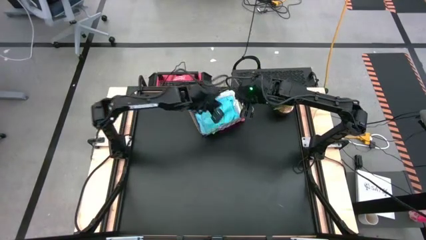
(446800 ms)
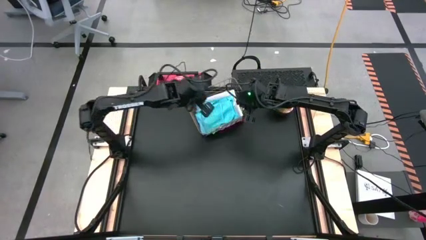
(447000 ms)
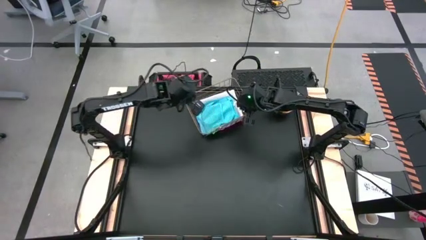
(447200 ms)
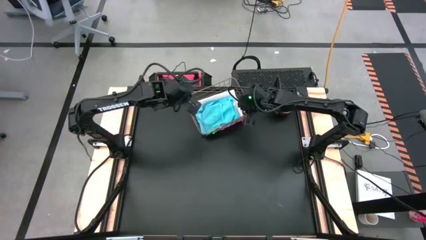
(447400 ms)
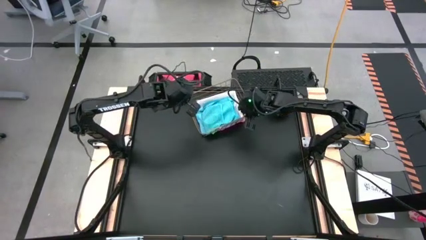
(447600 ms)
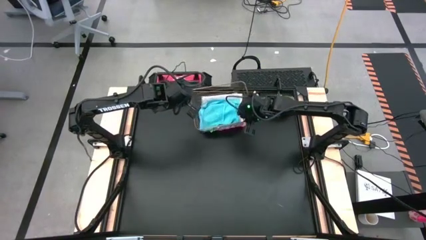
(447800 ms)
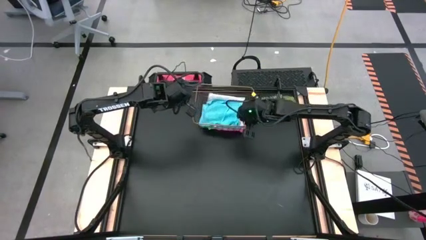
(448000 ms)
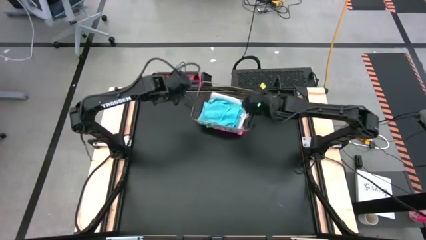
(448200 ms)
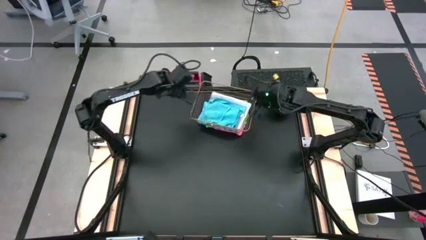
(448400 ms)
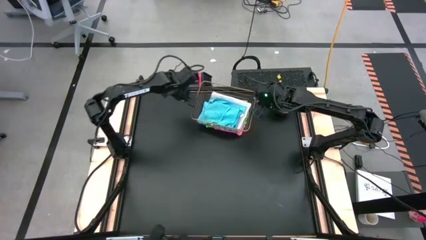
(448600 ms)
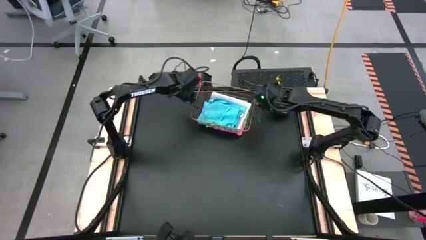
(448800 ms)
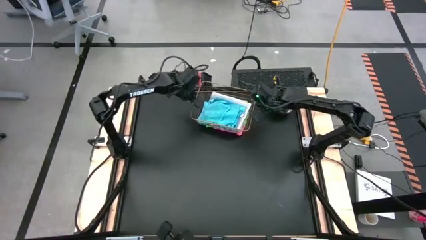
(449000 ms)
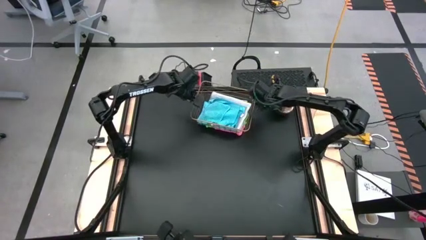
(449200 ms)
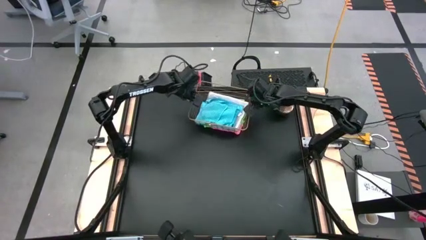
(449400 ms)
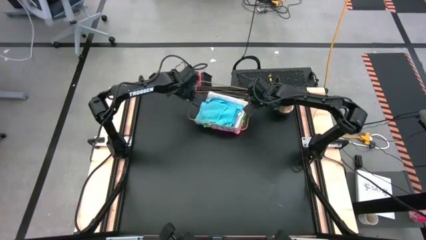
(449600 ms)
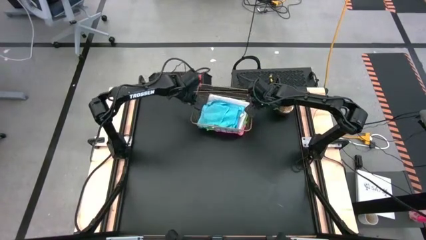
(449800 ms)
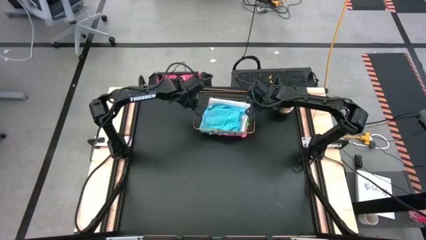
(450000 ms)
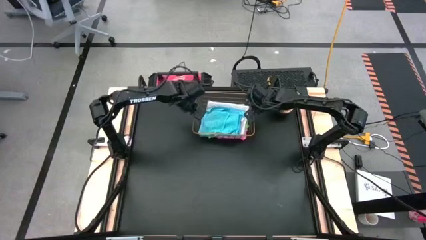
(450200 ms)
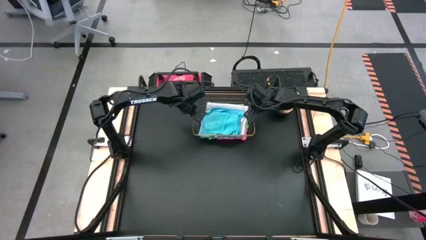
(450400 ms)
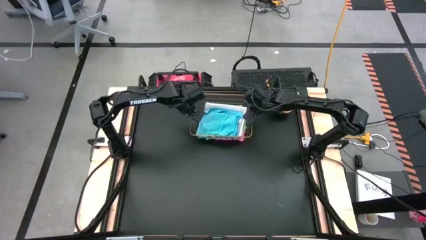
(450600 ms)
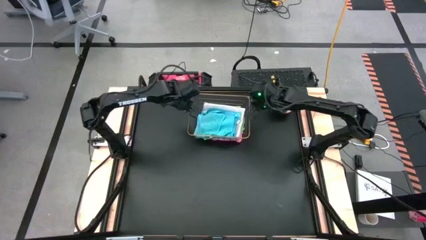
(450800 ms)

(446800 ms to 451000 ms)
Task: Fold microfiber towels
Adjust the wire basket

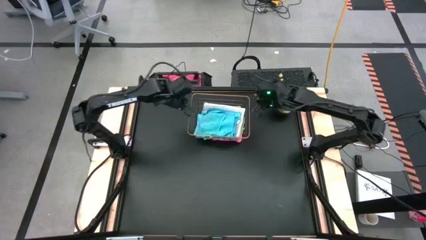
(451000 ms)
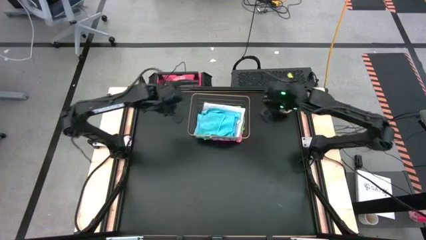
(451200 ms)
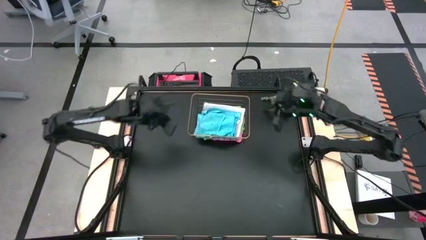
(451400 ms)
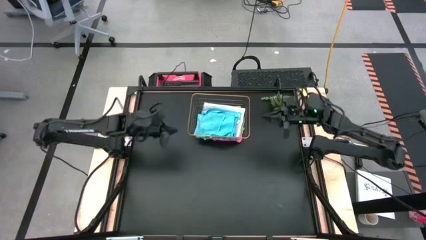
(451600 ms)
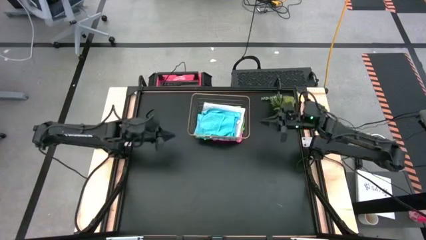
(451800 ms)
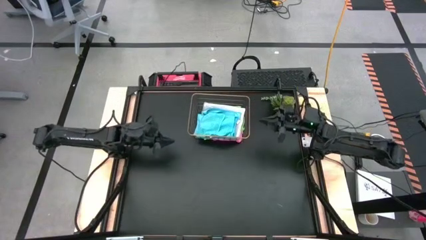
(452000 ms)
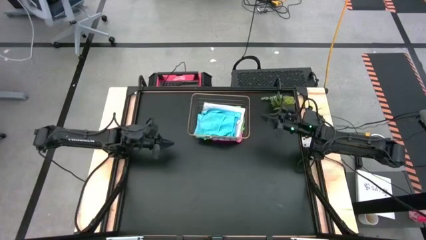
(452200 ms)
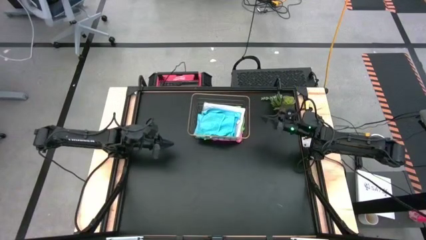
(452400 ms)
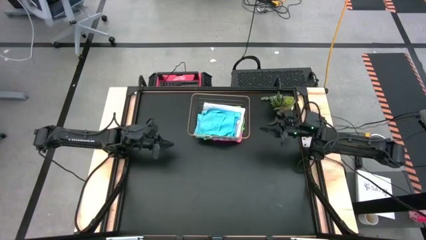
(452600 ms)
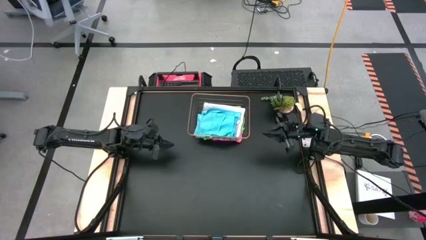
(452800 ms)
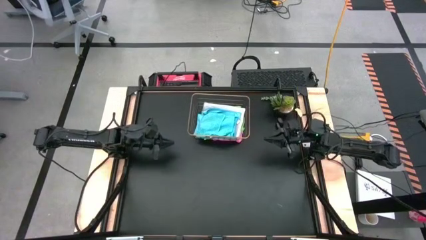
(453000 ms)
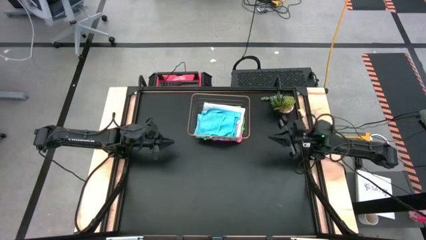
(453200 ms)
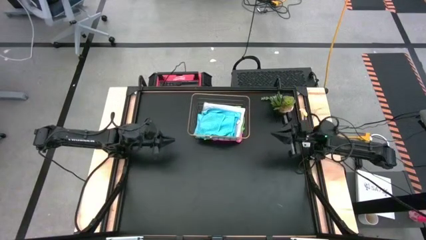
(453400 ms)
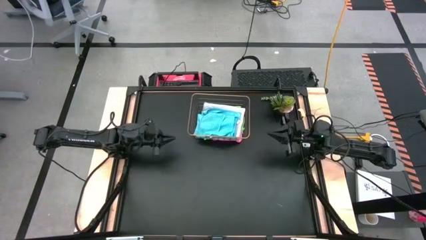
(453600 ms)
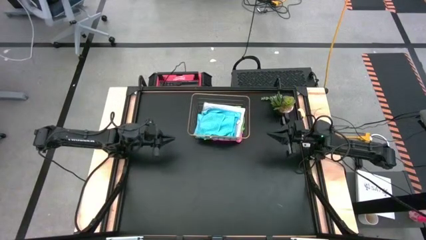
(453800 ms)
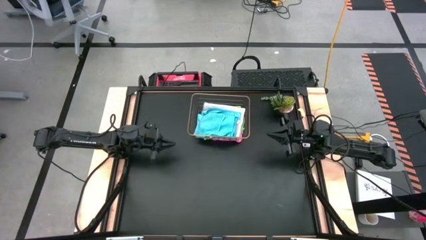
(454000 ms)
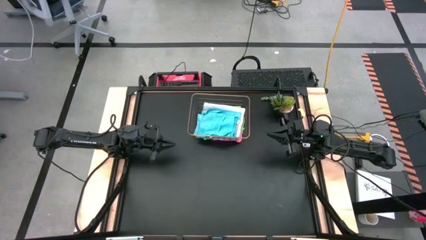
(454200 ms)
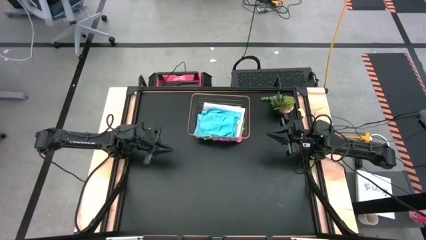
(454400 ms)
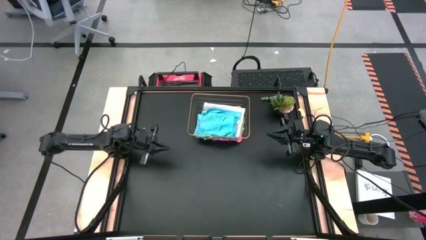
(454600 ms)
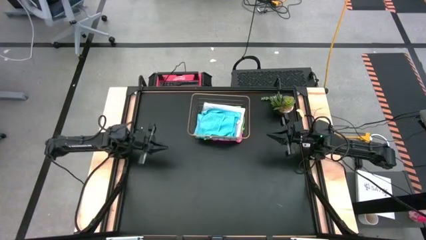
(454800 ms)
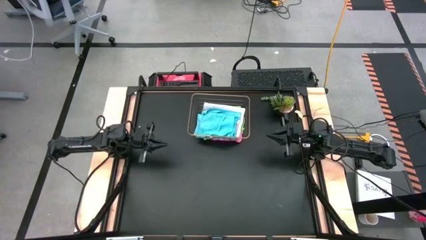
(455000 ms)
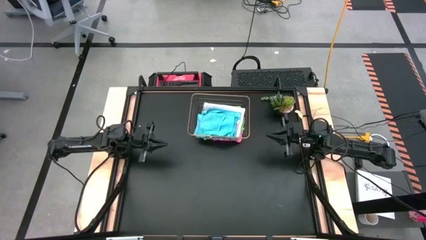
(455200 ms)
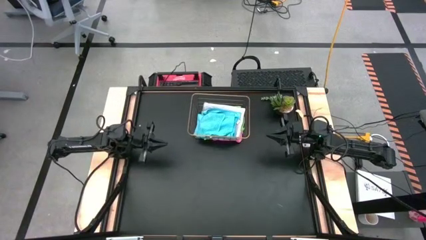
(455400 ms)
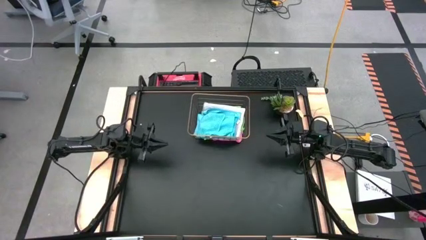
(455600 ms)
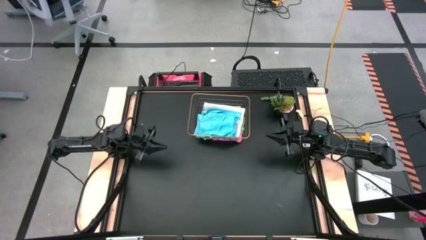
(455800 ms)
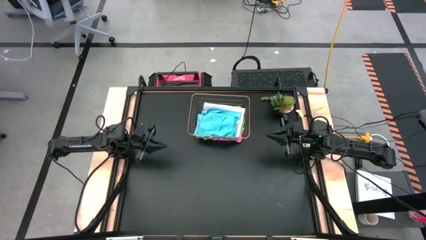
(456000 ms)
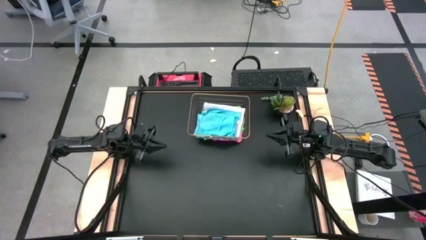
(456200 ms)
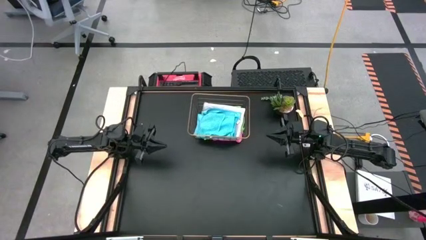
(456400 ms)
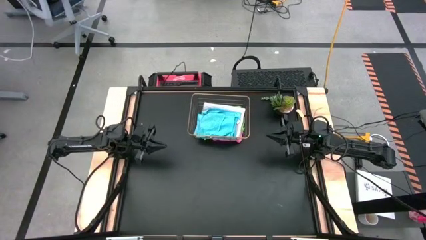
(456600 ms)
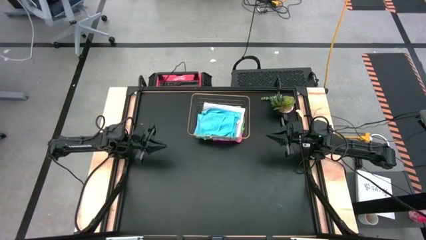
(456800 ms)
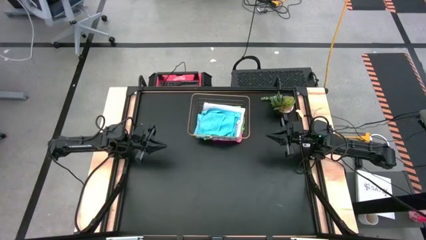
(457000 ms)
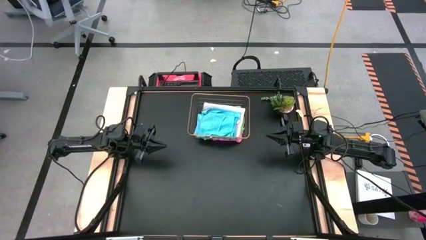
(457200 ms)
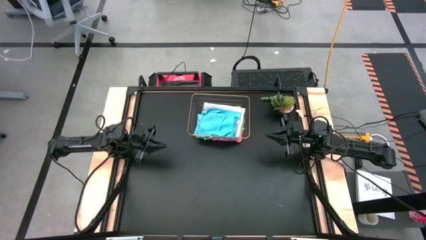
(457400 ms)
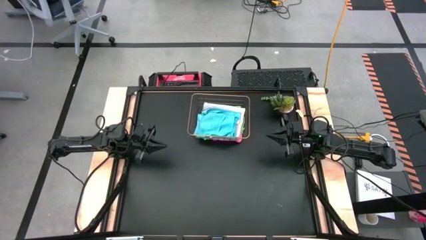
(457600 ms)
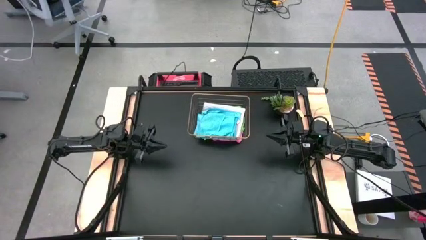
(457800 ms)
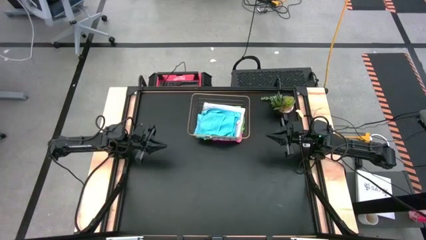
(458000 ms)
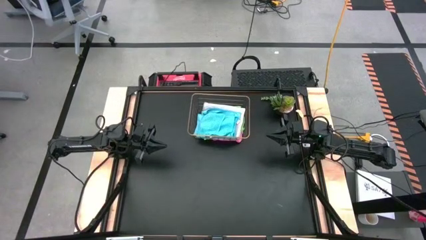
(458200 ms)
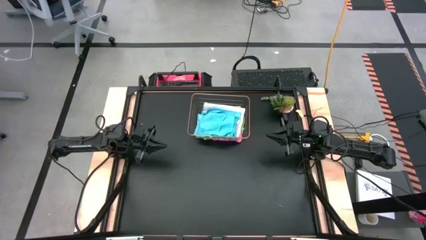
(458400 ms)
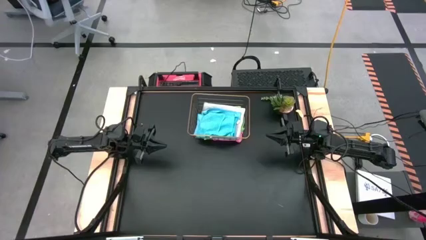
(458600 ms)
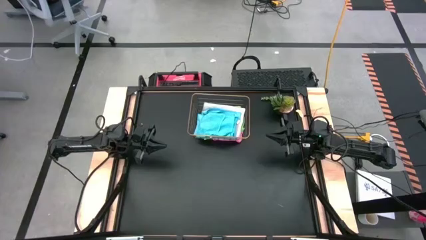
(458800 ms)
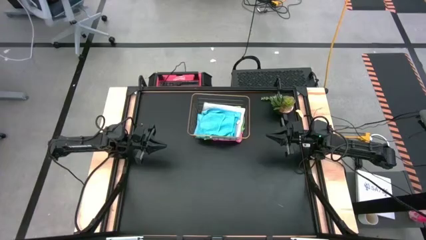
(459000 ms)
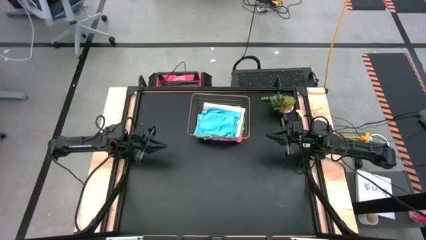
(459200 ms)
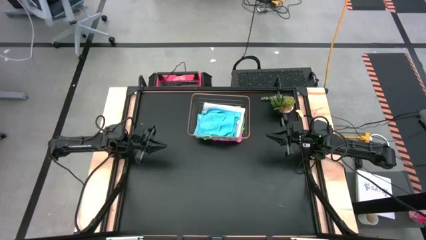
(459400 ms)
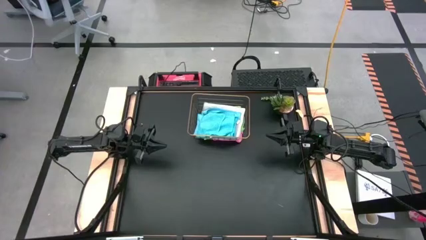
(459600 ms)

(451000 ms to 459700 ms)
Return to Home Position
